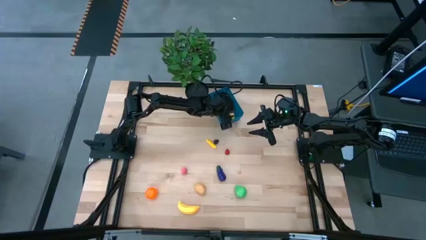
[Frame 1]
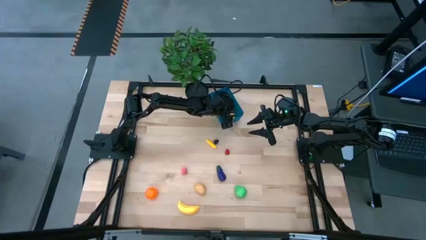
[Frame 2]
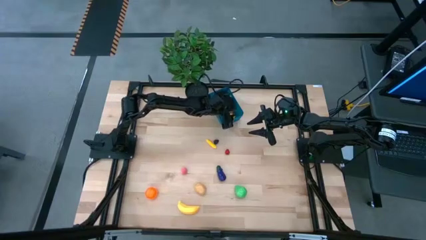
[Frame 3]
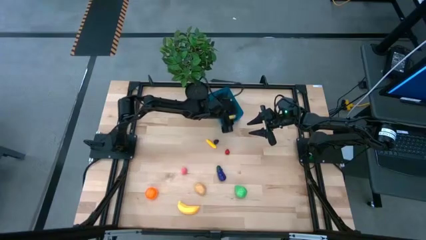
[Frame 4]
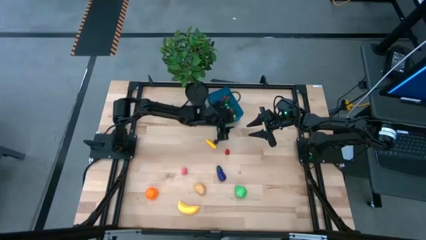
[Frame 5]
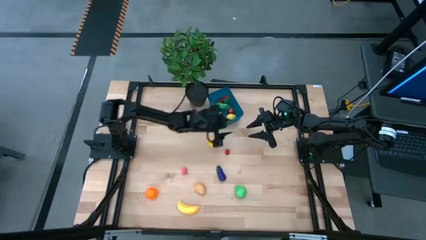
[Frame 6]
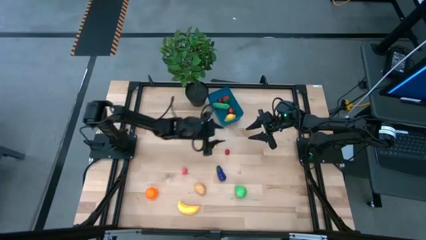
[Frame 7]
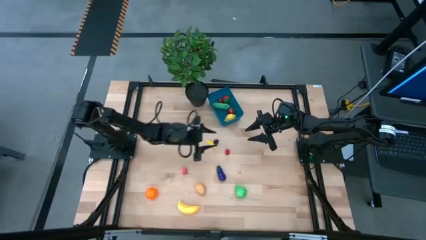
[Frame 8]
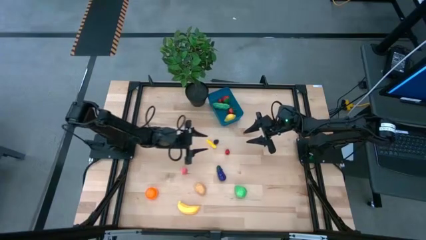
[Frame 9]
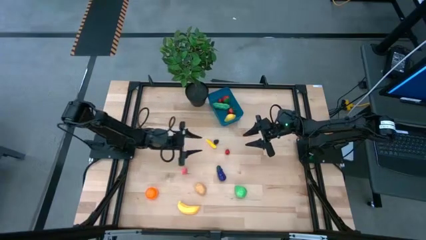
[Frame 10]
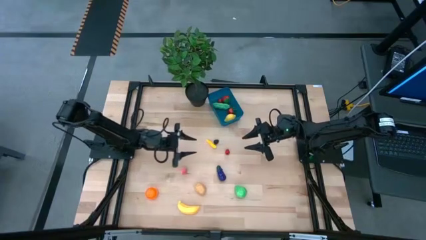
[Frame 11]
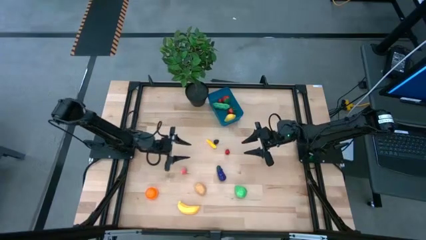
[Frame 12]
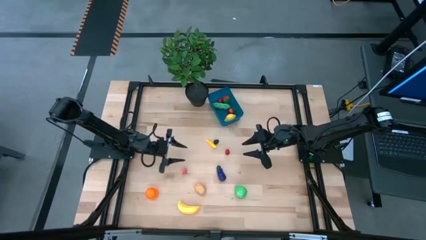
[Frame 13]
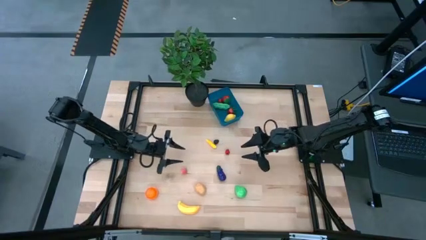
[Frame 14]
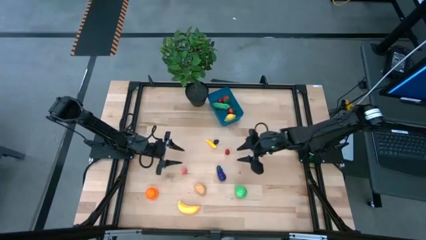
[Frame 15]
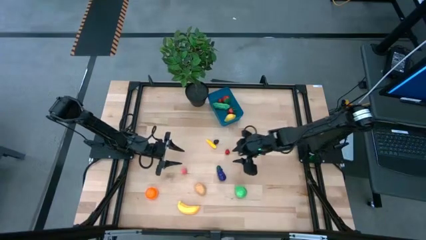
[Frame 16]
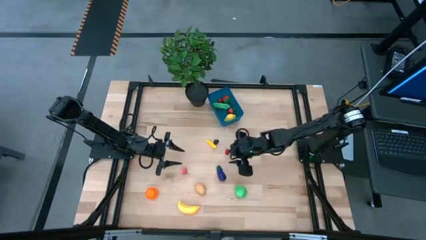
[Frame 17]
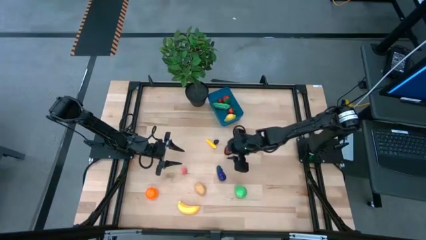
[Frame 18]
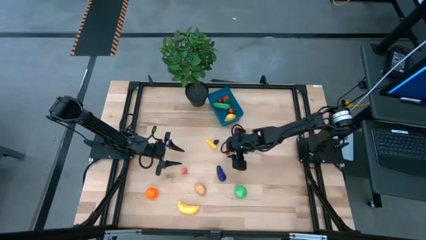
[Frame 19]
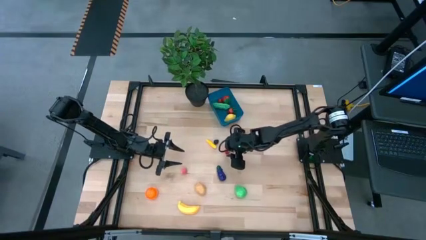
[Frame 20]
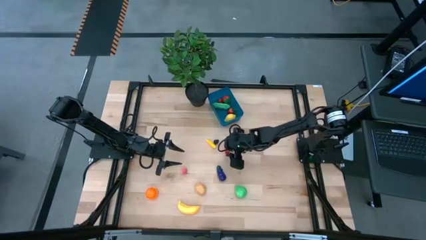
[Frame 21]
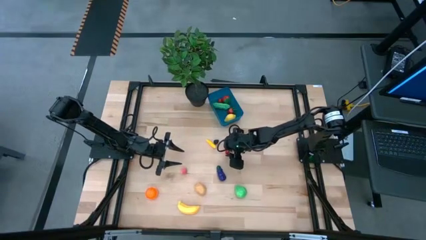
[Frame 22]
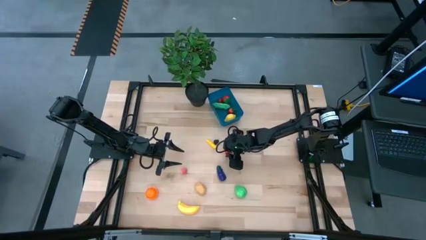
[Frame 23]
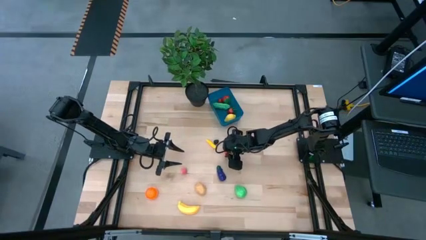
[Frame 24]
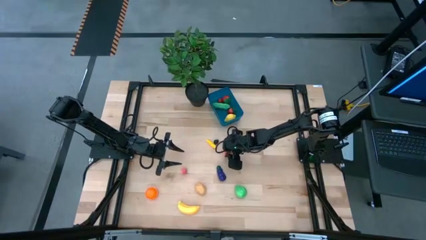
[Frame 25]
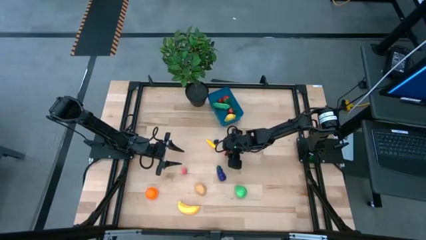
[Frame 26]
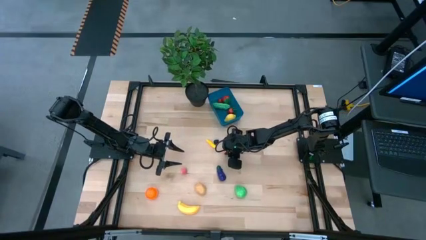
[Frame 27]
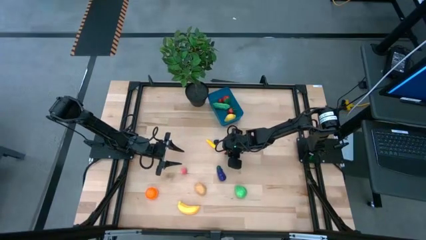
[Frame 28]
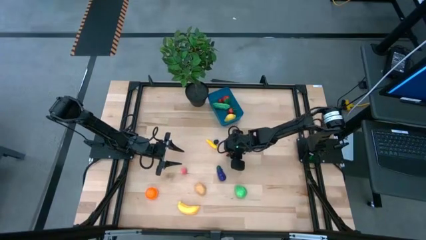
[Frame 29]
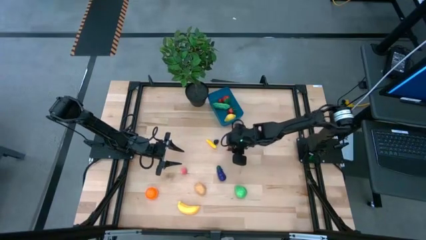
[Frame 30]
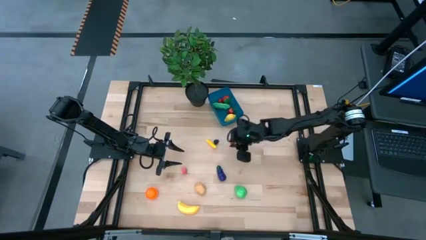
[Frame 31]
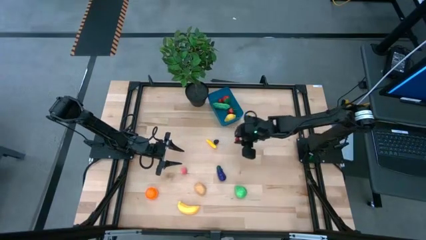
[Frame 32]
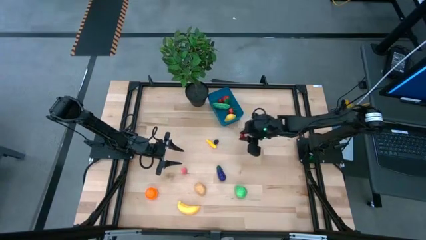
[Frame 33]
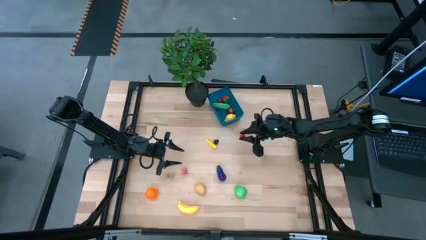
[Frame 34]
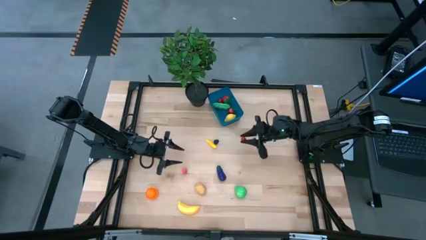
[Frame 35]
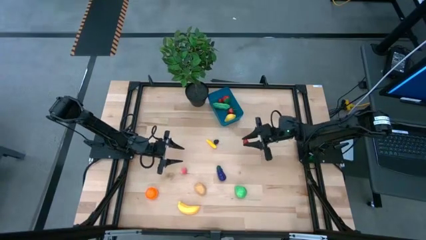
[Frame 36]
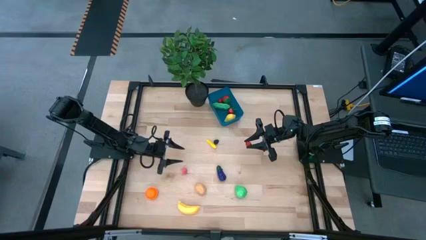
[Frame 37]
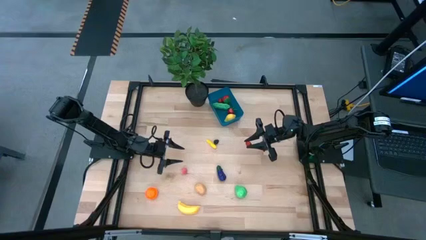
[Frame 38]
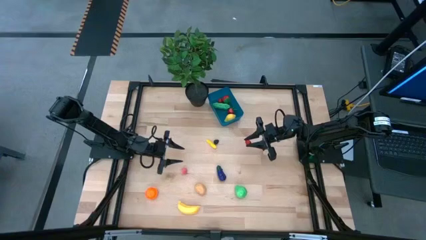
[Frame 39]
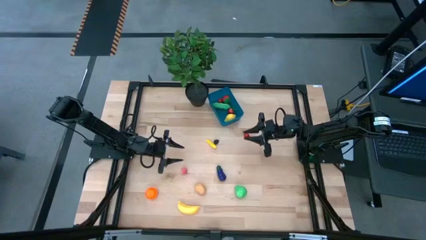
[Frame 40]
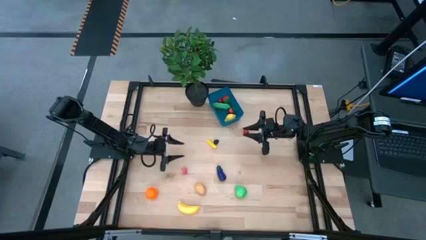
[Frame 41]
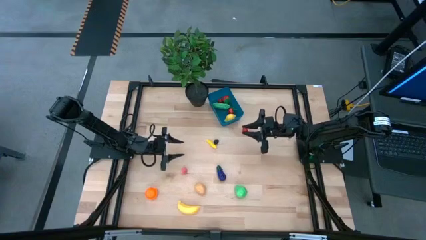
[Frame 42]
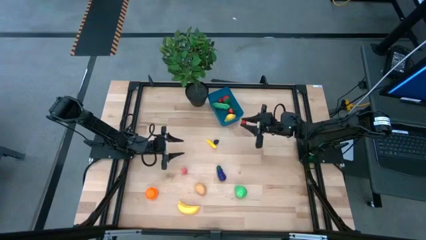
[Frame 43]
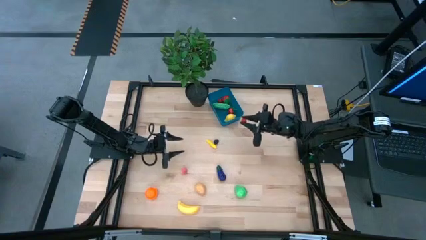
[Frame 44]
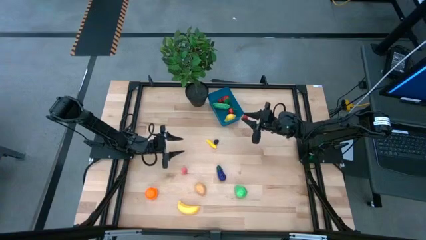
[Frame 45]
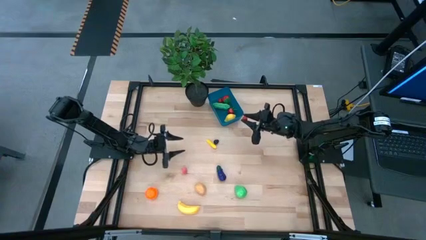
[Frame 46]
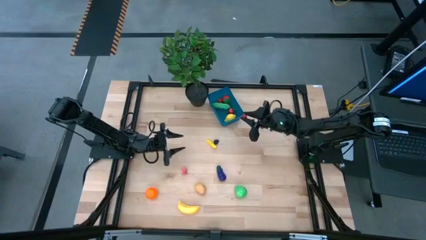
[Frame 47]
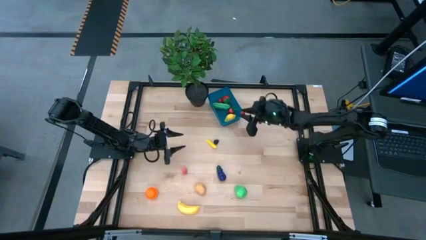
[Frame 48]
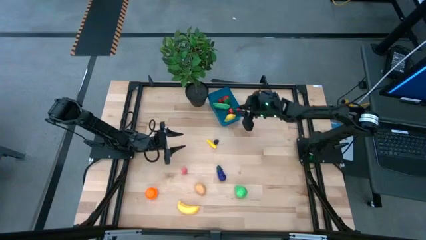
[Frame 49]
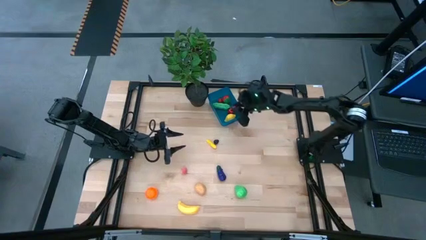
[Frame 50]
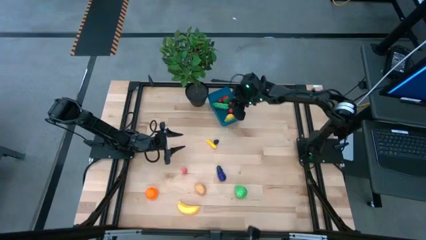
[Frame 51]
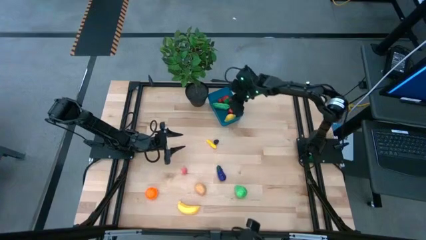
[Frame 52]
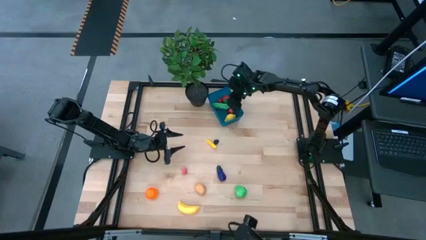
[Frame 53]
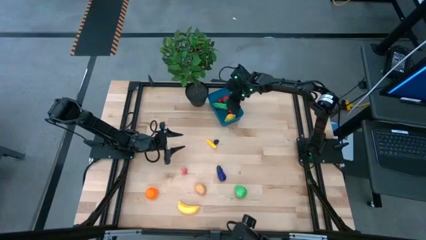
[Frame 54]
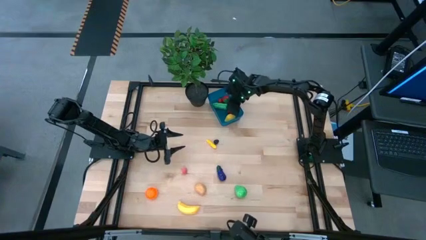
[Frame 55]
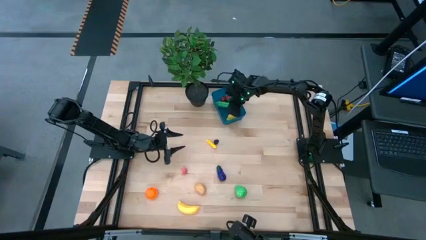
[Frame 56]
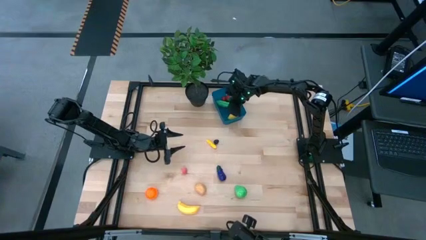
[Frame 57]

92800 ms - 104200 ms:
Task: Pick and placing Produce into tupperware
Put the raspberry into the blue bin
